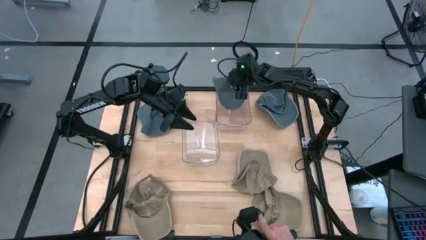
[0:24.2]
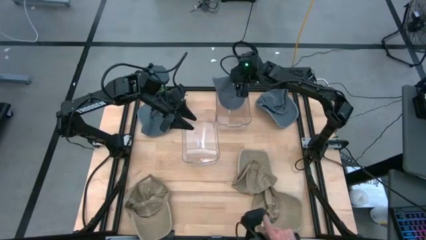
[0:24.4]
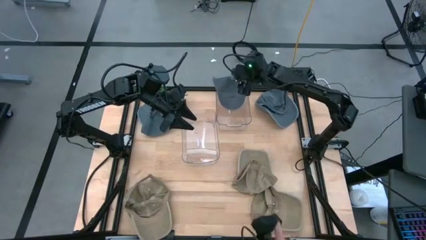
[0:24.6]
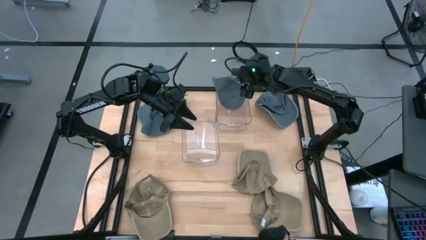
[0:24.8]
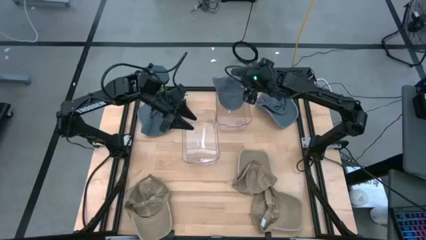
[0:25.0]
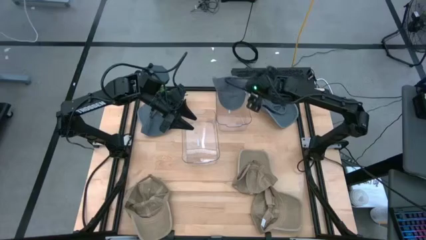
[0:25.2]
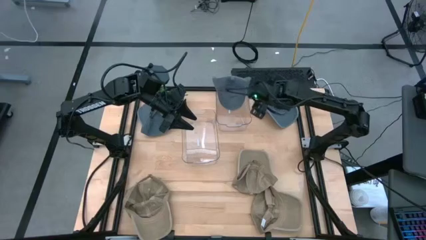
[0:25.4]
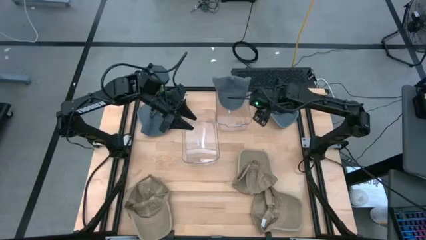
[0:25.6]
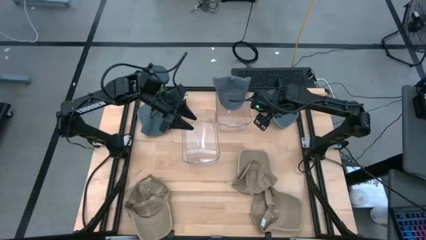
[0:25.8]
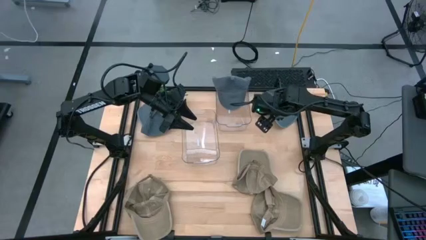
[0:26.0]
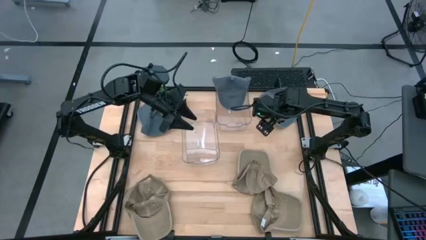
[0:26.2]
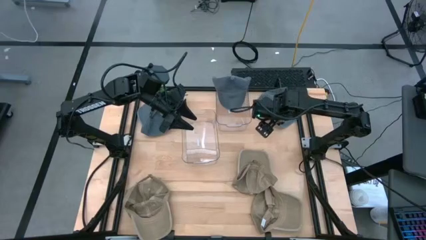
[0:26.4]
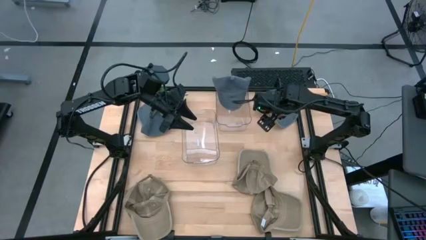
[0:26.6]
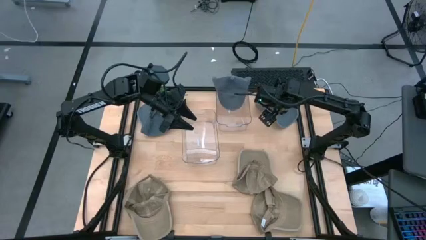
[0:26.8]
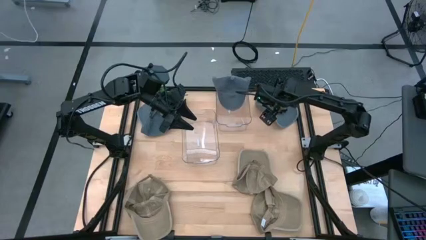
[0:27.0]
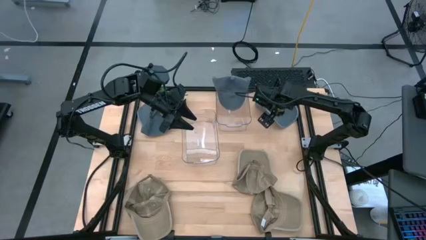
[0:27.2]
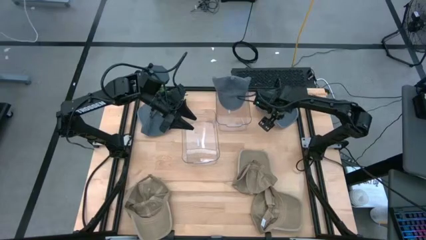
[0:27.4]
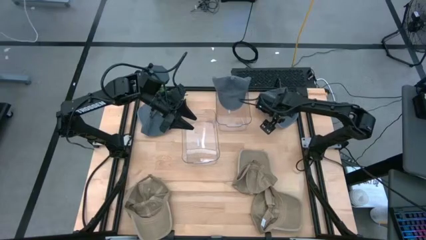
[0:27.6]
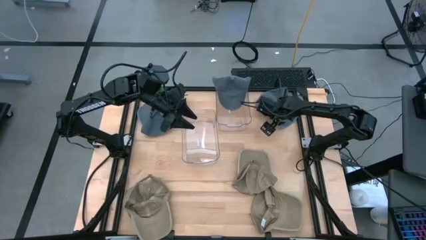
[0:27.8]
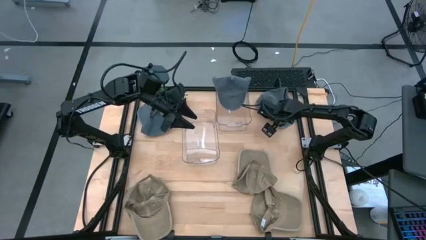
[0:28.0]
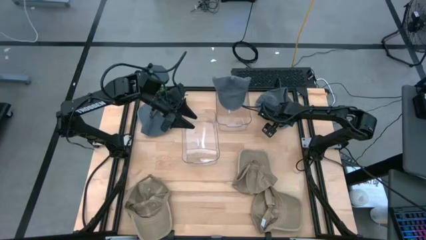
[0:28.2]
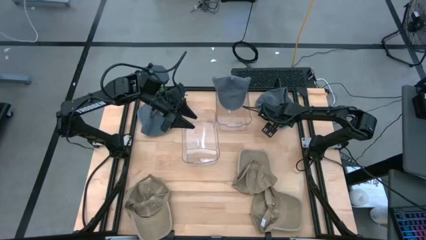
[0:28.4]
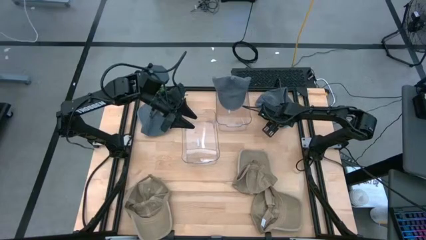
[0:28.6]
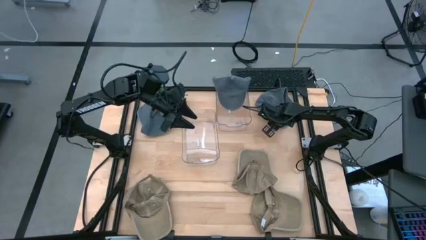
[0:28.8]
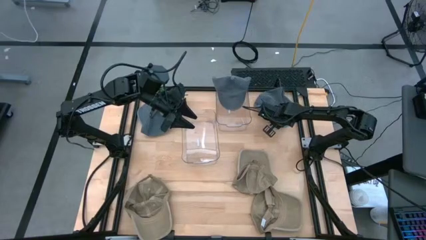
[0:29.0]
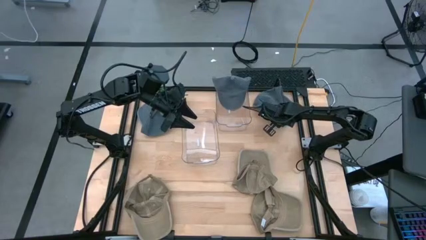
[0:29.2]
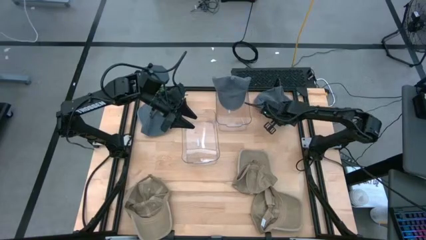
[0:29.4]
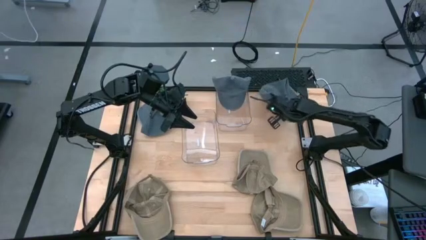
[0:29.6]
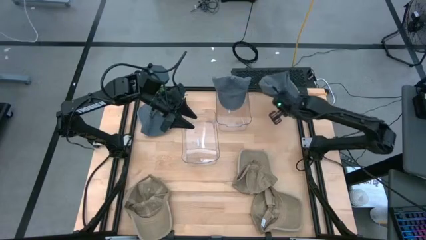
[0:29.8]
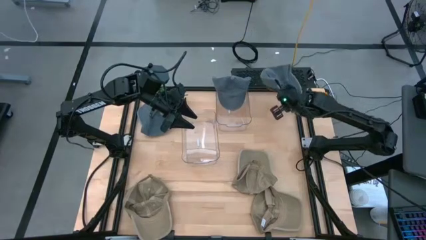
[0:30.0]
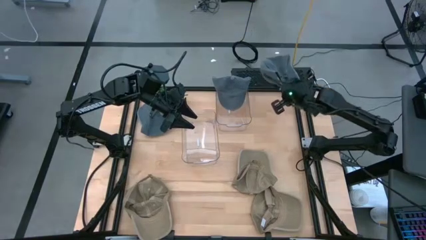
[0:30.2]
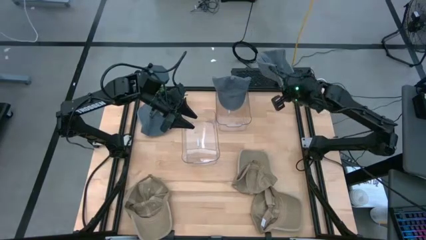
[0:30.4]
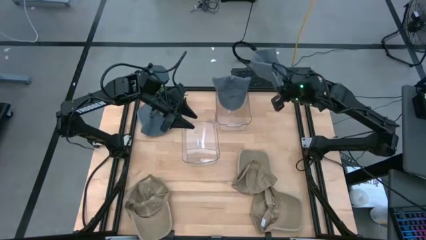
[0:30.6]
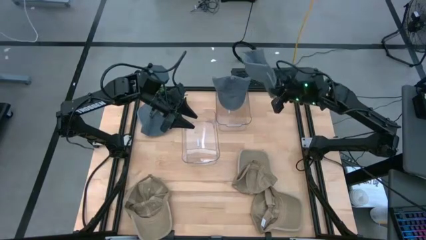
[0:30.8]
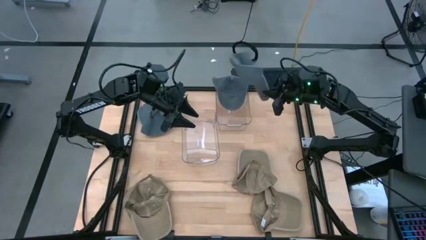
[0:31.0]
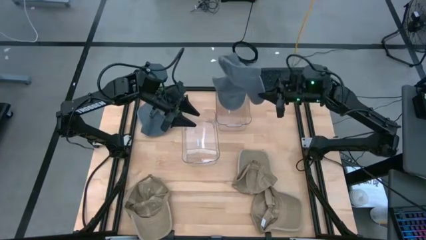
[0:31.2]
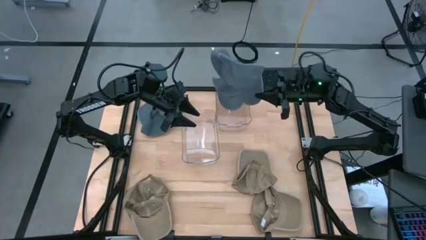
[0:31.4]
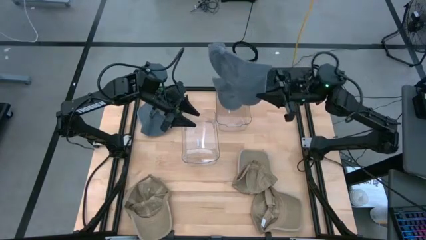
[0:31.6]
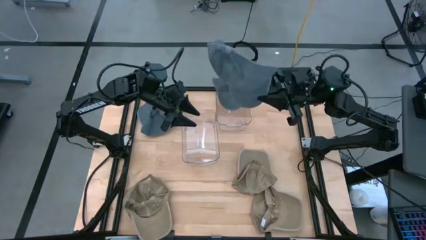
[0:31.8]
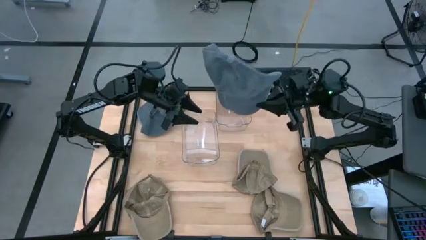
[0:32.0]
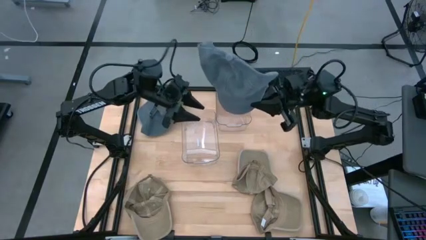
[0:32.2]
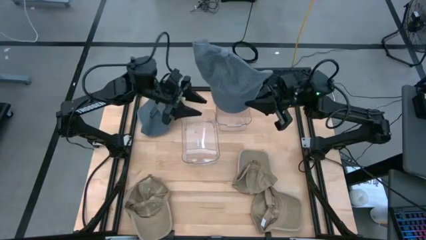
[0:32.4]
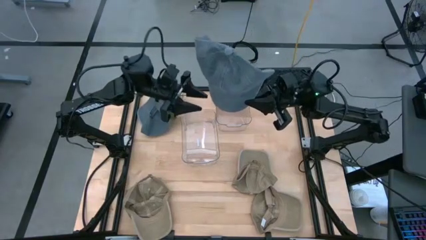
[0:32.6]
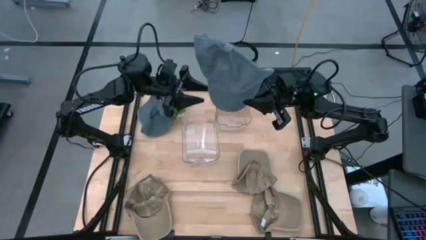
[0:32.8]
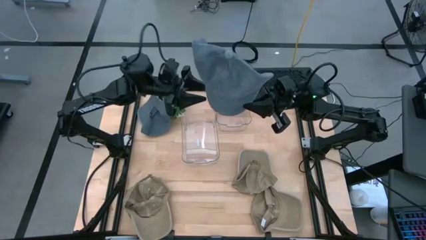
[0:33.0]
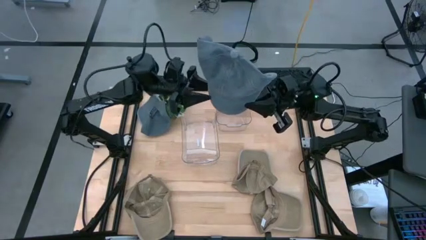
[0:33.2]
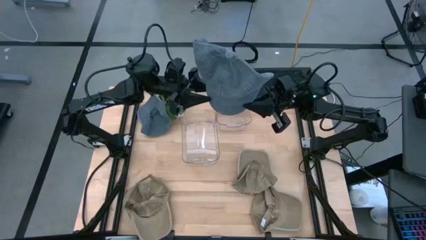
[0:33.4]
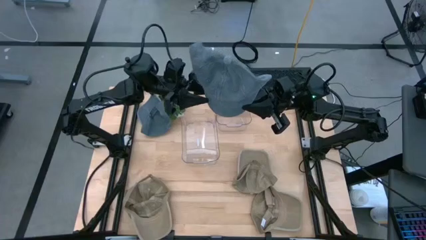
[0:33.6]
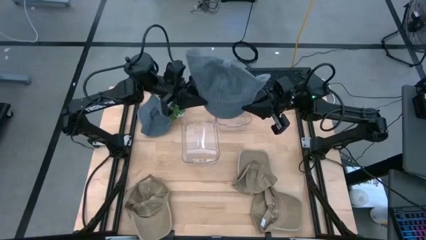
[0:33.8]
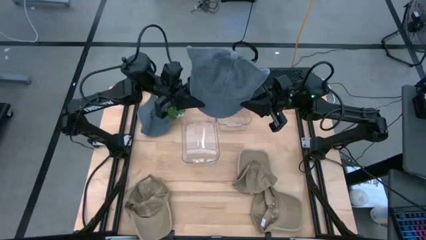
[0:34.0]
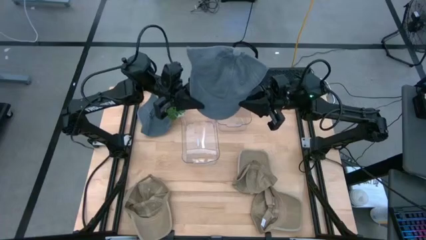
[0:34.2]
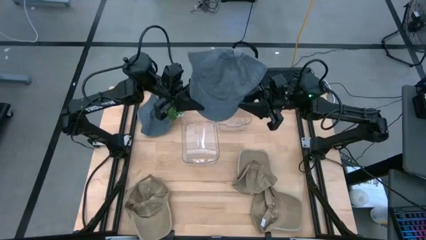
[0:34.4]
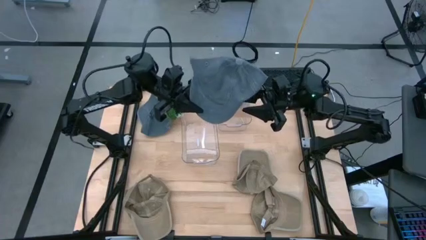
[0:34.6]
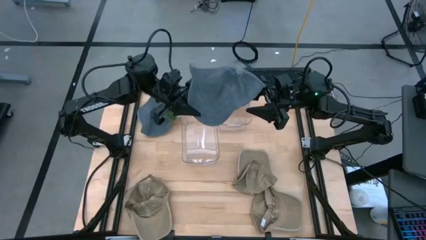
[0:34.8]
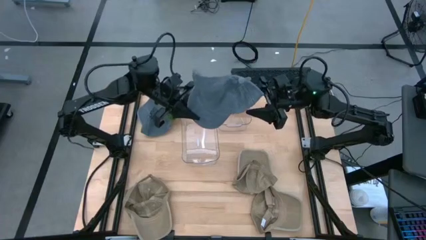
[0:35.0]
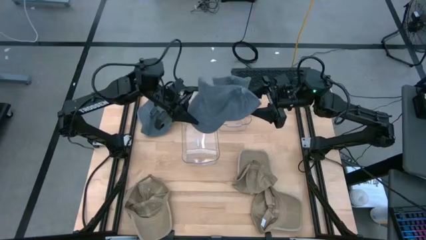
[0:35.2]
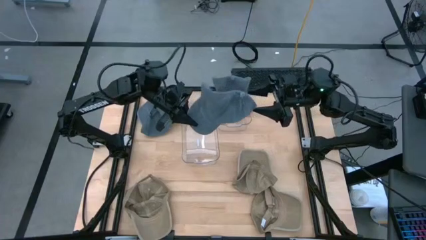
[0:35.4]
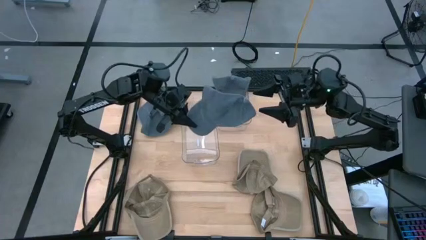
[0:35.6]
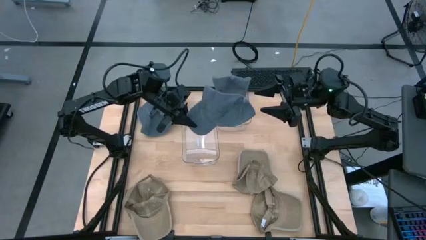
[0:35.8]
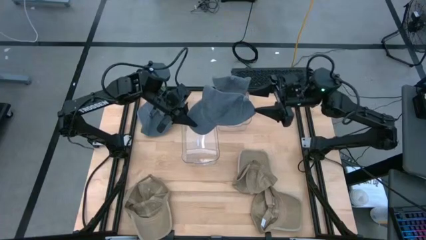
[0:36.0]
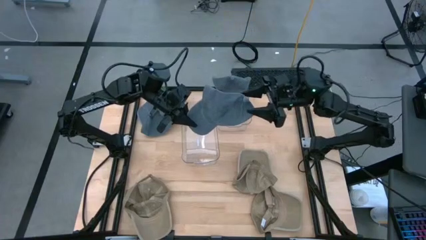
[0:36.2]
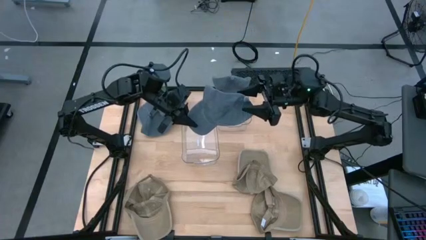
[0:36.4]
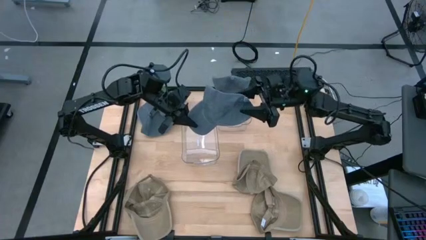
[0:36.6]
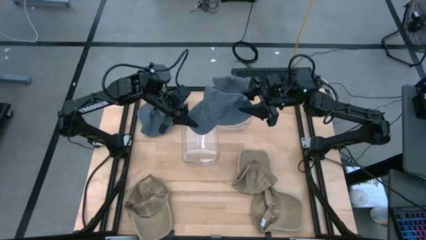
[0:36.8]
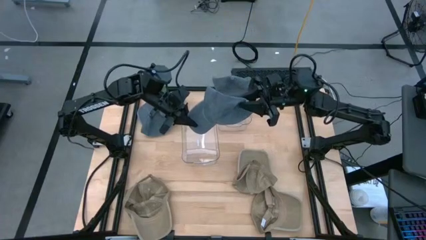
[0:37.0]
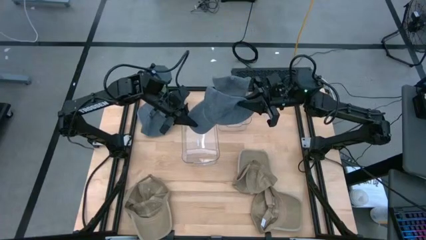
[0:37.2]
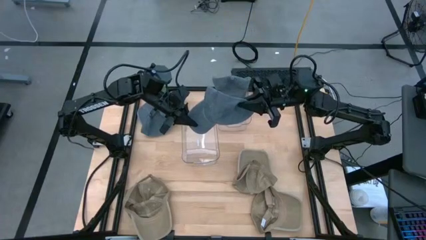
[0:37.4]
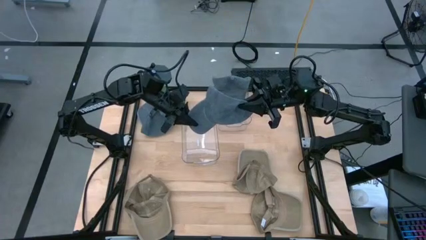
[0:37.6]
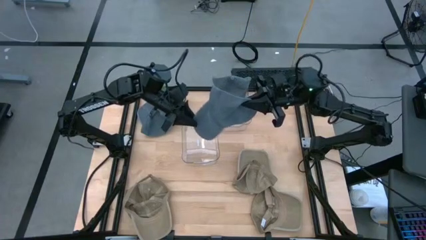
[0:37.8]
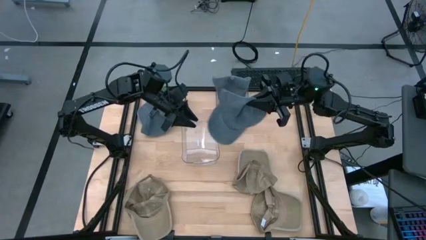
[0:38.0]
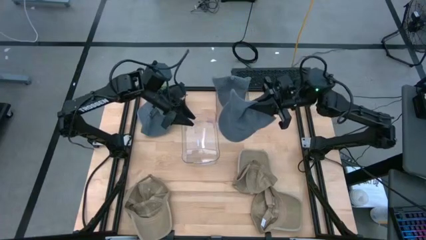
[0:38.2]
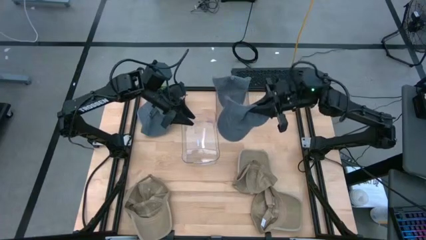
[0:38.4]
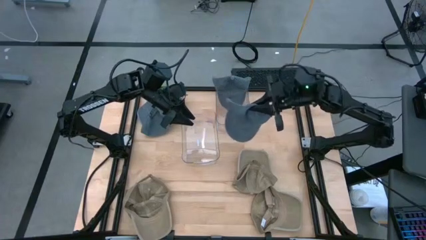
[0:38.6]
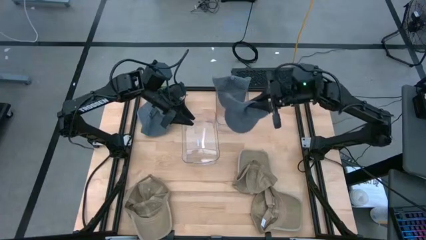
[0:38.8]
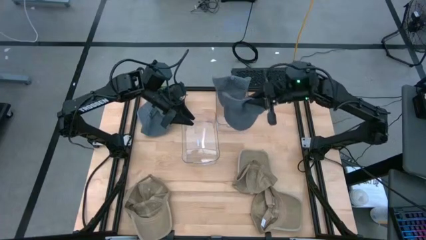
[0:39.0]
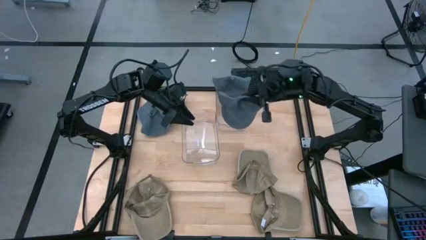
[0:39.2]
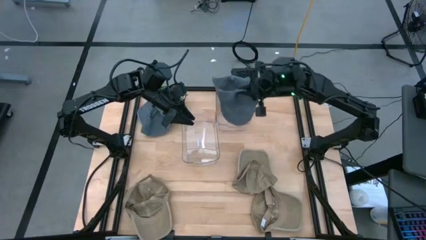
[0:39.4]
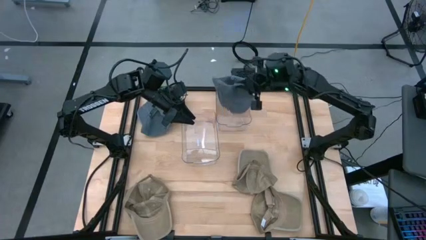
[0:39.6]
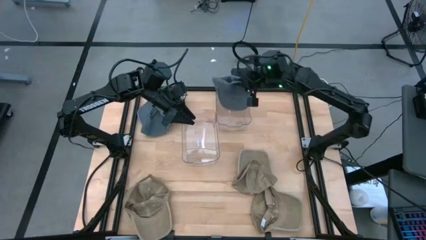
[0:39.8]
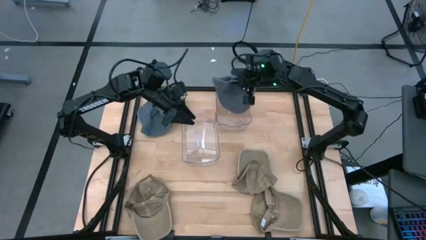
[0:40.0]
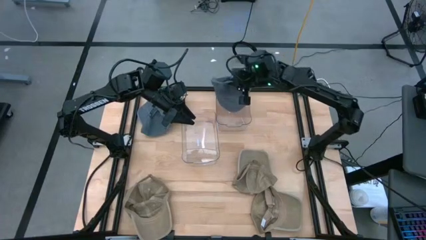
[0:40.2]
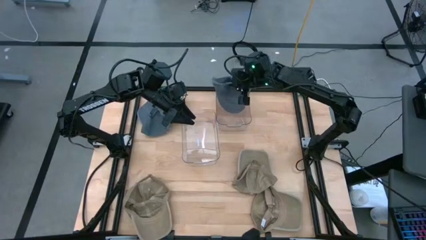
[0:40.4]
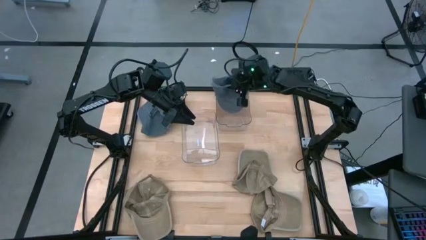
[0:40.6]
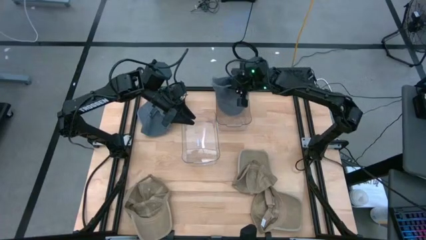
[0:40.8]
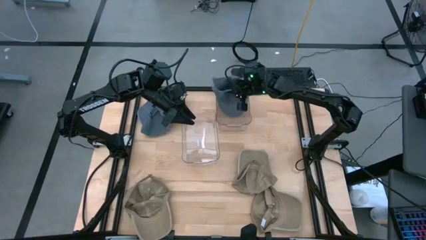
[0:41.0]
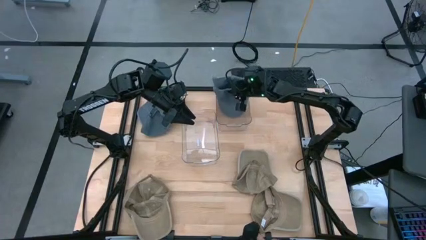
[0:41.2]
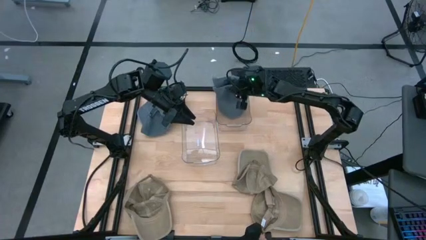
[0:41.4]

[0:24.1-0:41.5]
Task: Pick & Place hat
Put the right ash blue cap into the right transparent bin
